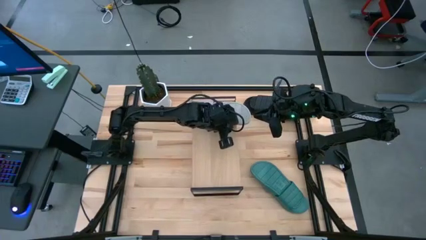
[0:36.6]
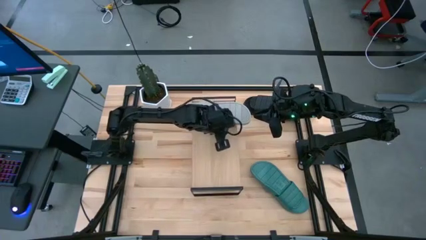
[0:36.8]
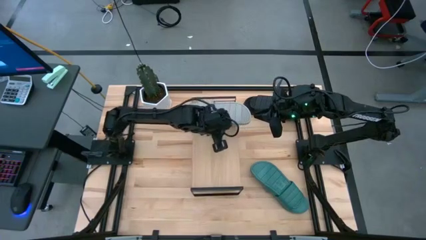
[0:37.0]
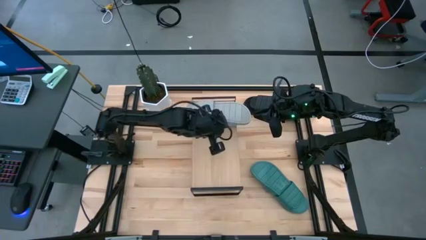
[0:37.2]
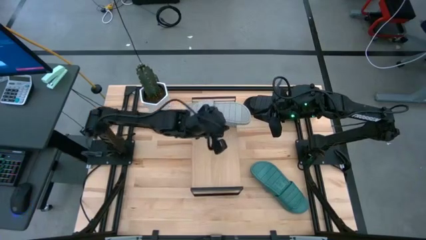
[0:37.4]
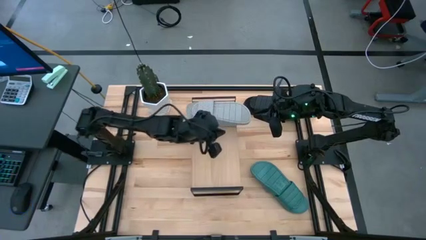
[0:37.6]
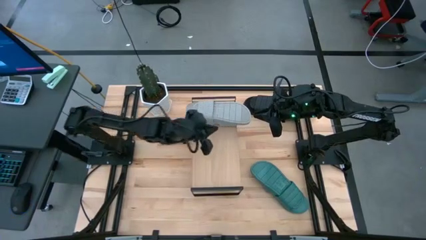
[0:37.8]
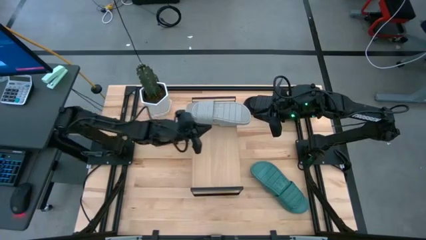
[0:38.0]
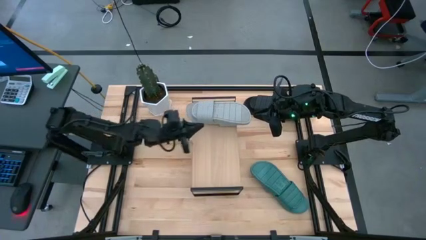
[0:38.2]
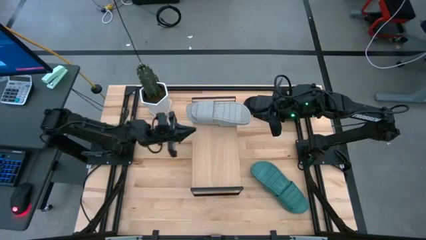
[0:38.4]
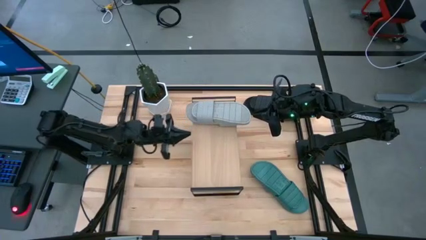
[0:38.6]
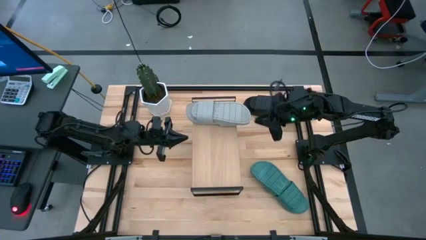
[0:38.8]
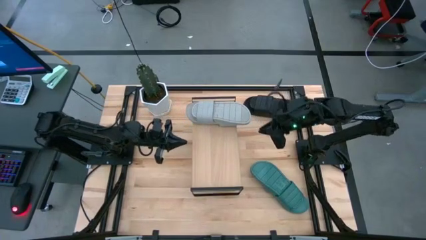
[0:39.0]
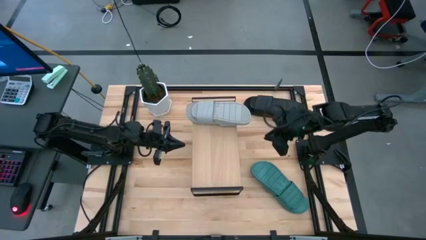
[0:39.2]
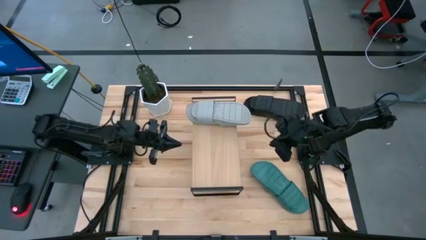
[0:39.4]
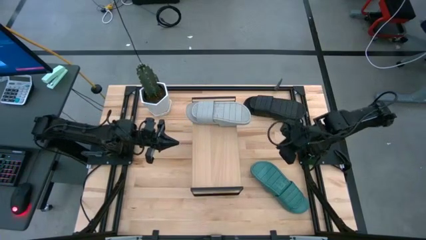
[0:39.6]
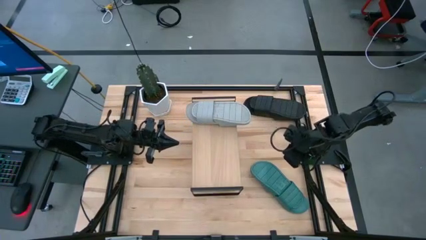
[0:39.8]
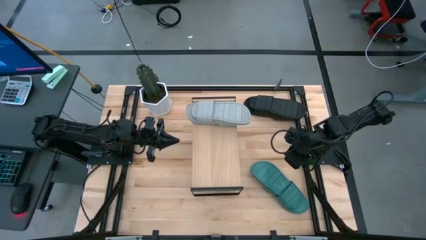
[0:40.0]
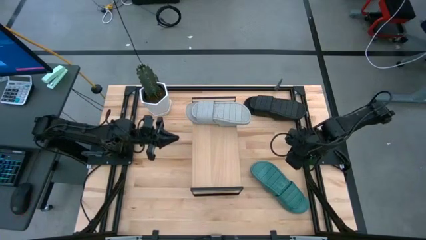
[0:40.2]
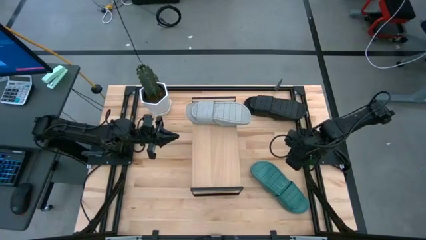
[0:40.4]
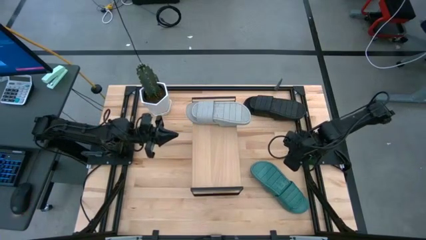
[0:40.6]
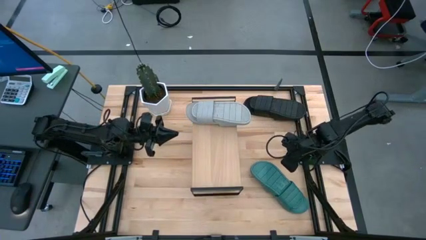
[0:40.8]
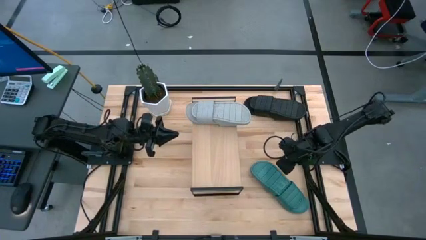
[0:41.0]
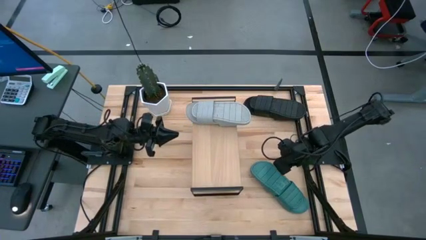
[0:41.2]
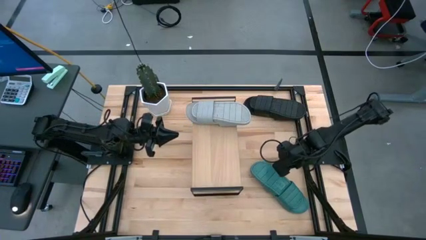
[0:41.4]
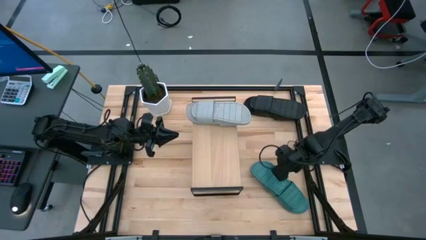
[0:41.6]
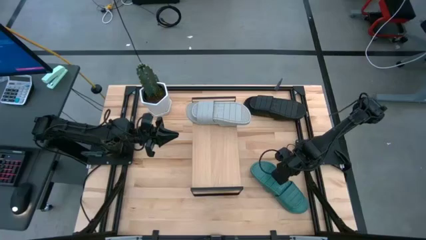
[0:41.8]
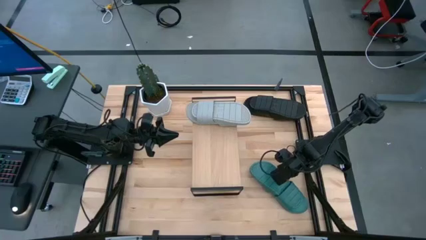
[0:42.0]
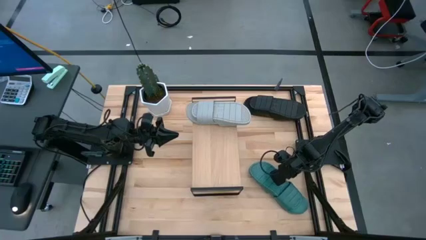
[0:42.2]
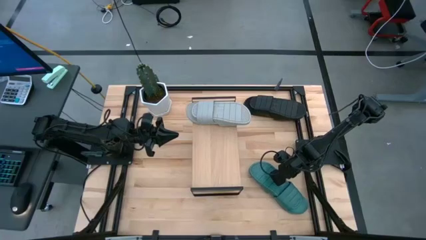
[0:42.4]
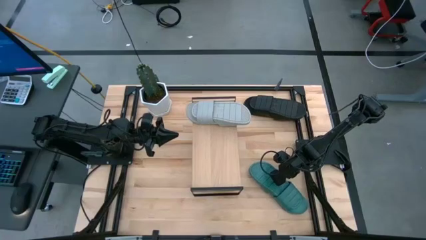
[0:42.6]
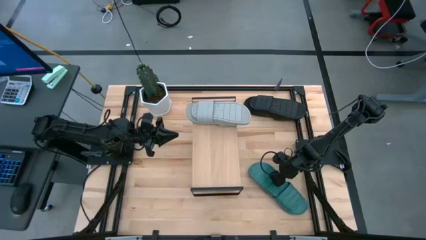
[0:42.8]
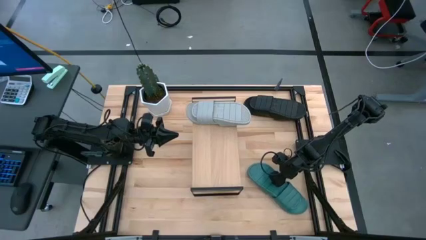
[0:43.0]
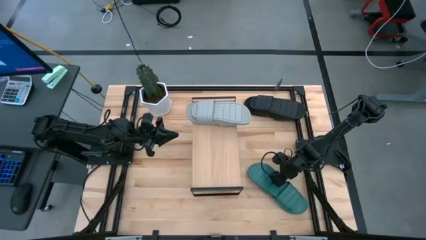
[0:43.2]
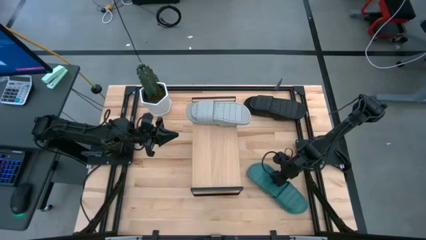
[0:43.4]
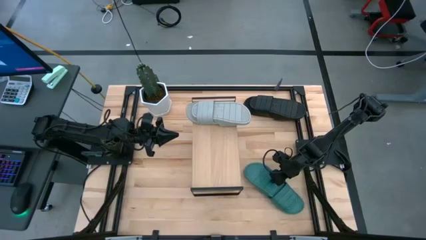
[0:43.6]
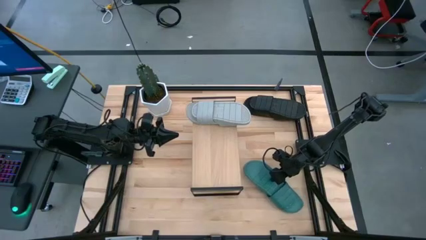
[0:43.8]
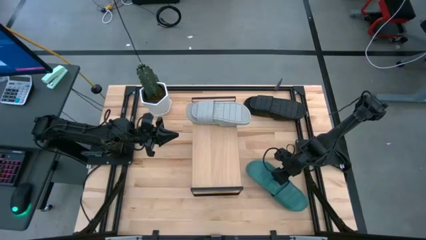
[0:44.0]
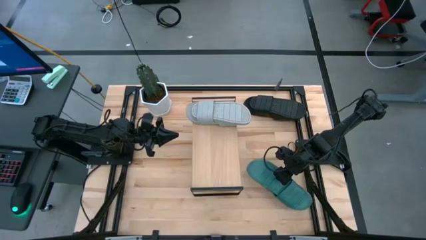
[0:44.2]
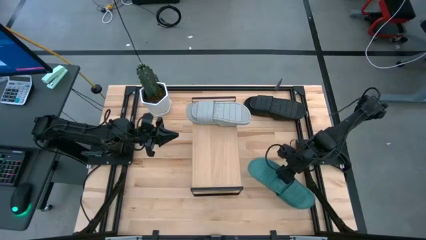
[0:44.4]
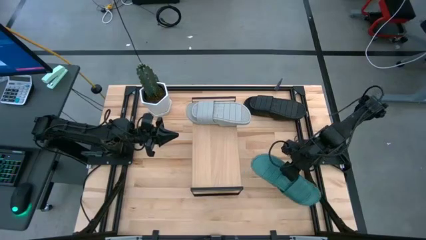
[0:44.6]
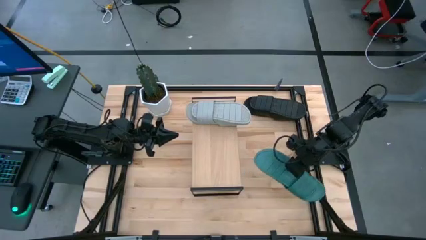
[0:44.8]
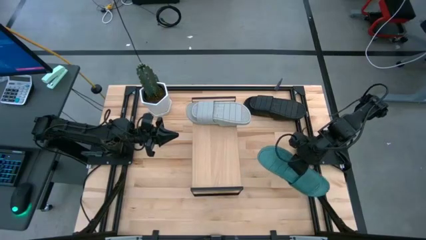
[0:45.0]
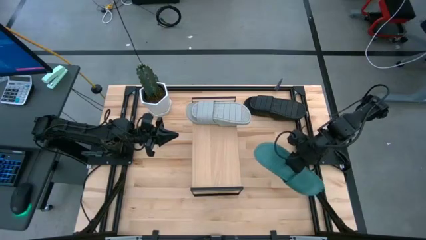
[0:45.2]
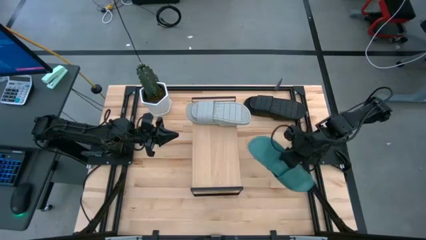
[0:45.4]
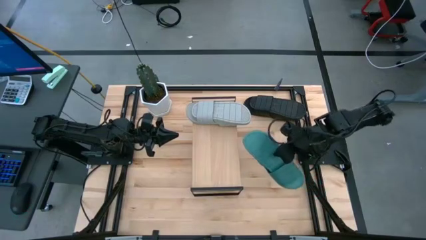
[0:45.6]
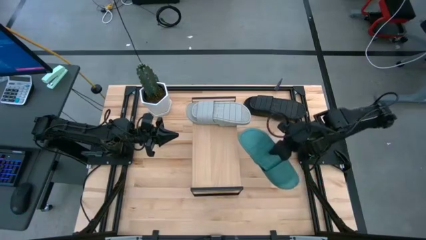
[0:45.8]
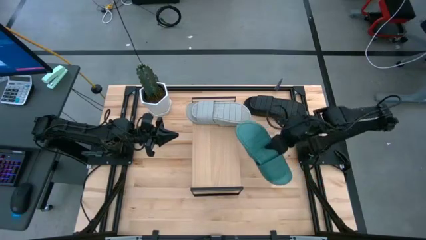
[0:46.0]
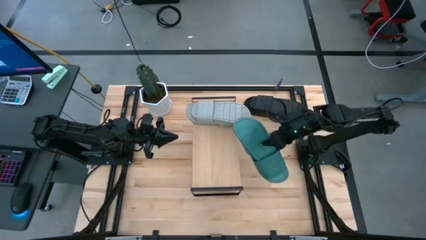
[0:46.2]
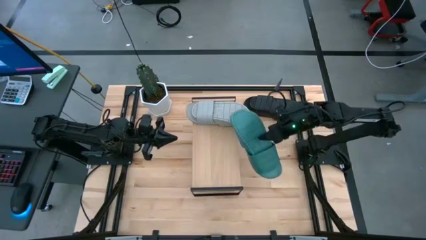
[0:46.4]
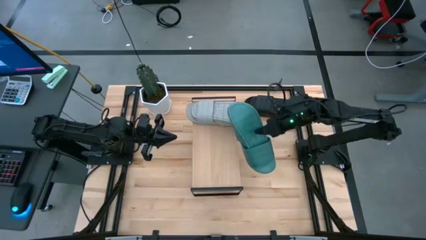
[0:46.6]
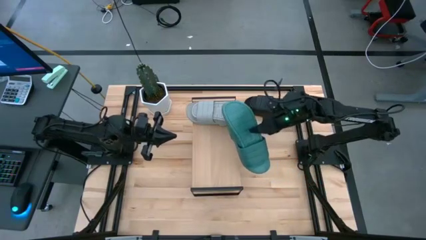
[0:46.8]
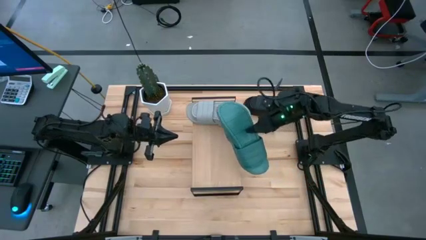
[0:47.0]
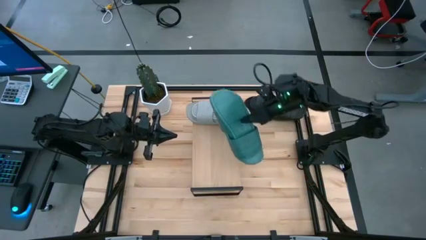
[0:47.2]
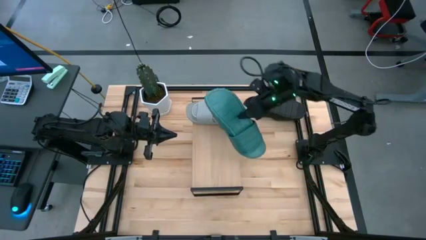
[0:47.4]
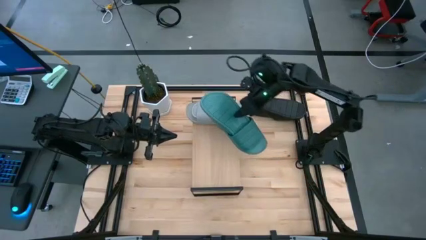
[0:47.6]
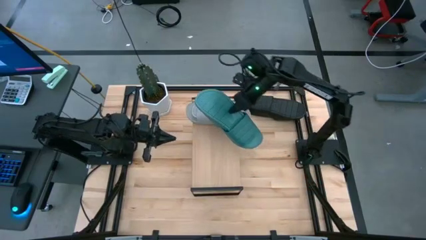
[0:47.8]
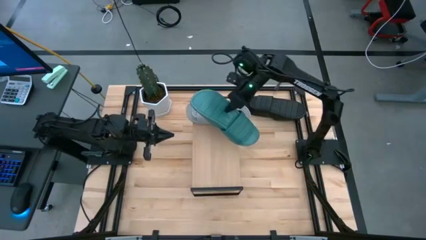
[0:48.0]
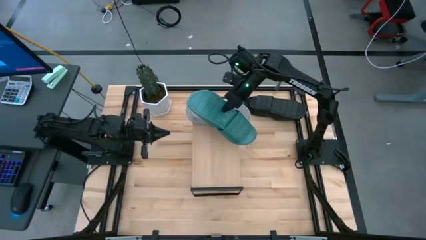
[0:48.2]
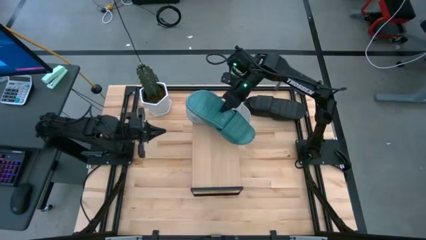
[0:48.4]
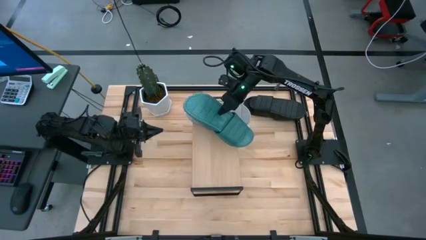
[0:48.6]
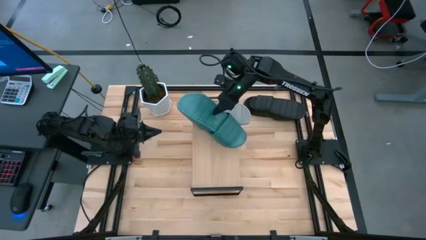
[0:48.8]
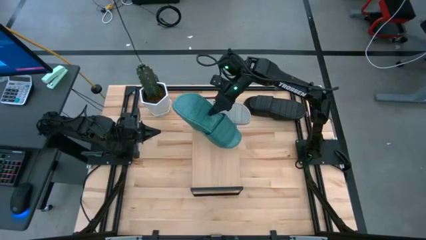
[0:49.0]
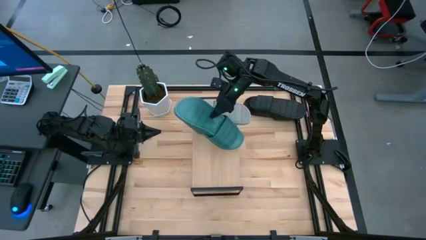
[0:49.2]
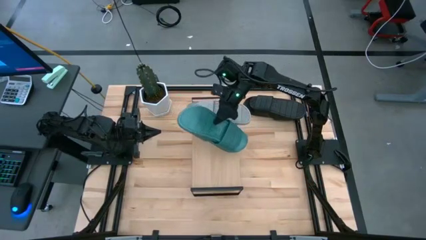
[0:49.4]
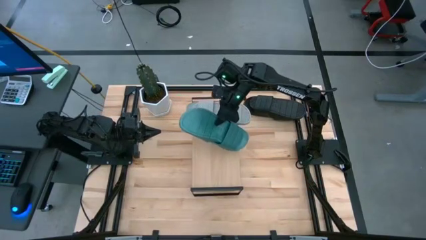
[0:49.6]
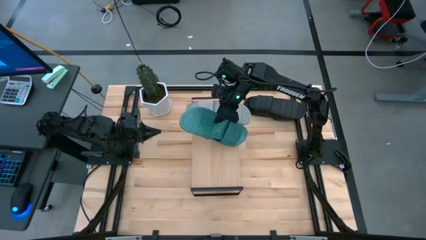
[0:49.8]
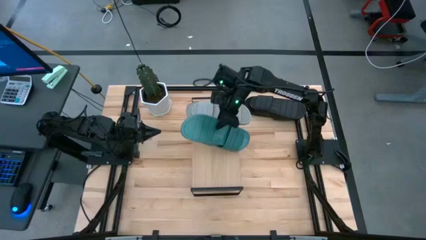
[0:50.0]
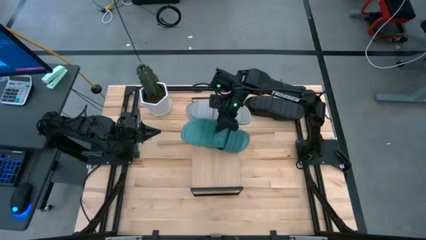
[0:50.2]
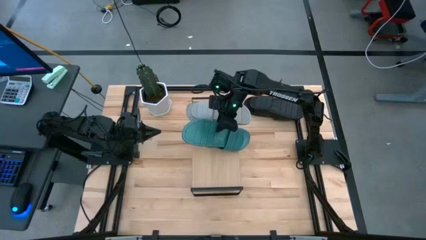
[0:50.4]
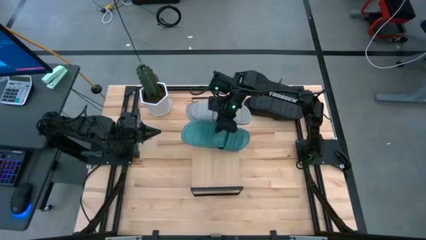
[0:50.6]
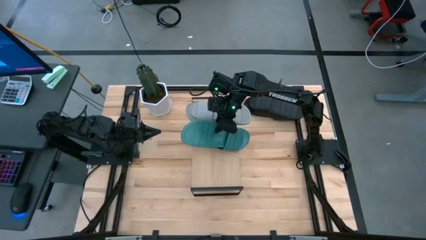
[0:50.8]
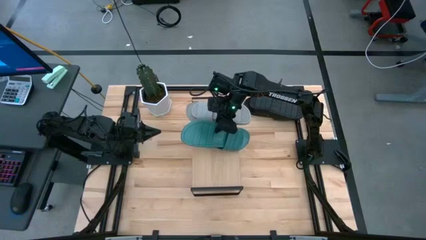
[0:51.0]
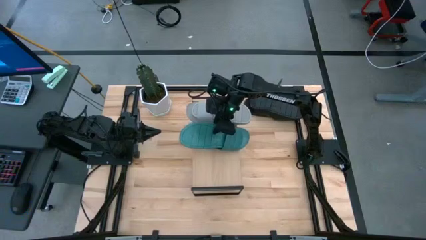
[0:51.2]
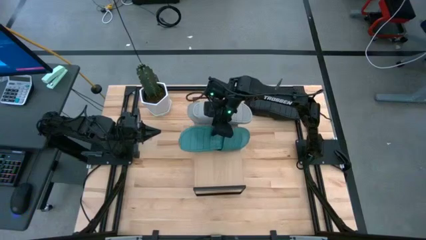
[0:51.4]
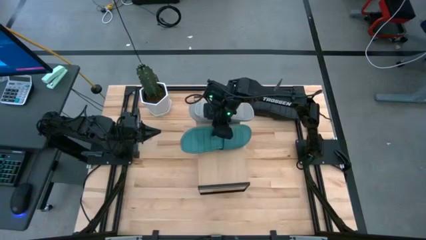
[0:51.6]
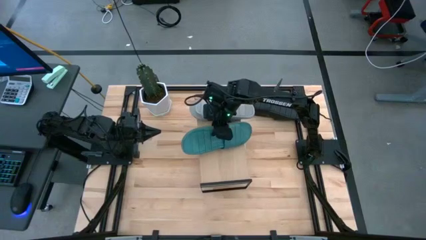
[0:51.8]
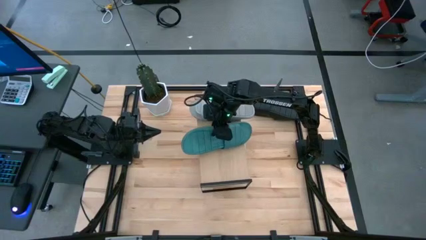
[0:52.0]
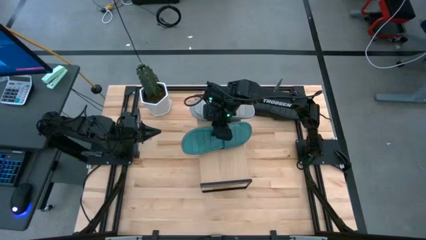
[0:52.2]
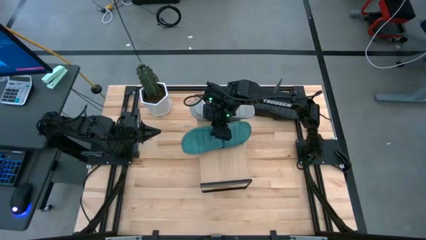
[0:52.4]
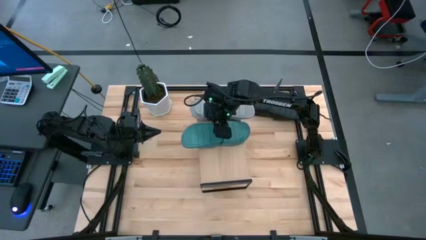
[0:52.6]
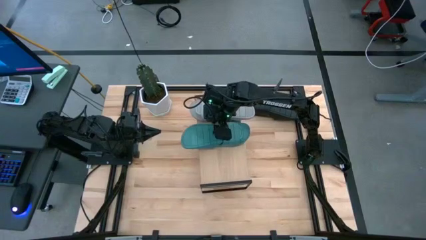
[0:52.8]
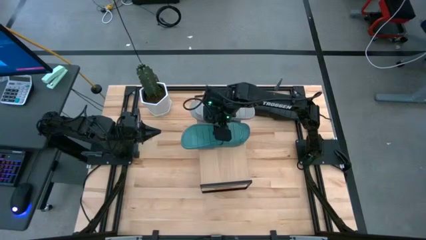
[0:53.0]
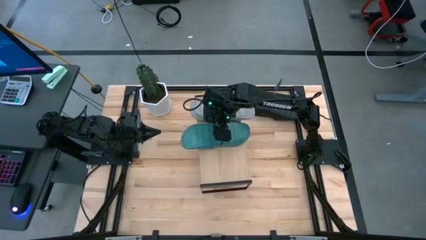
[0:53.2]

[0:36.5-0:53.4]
Task: Pick and place slippers onto the shelf
Put the green pair of slippers on the shelf
